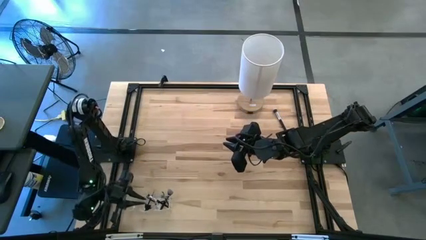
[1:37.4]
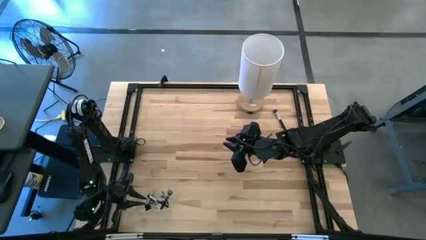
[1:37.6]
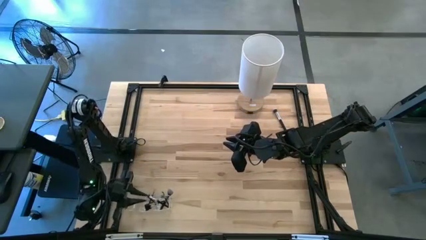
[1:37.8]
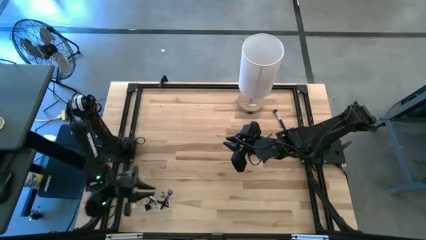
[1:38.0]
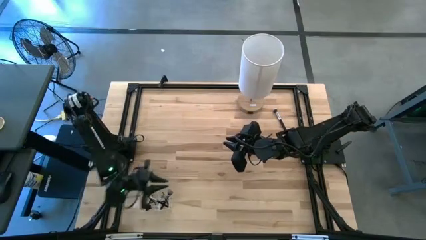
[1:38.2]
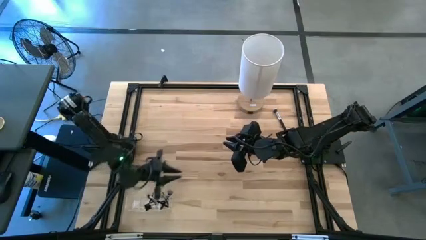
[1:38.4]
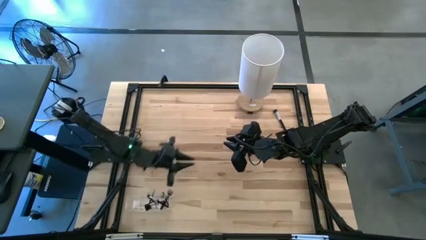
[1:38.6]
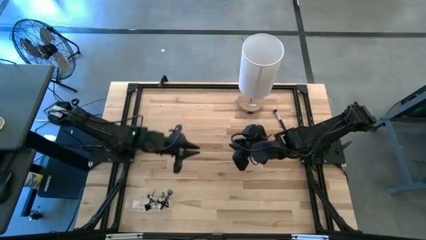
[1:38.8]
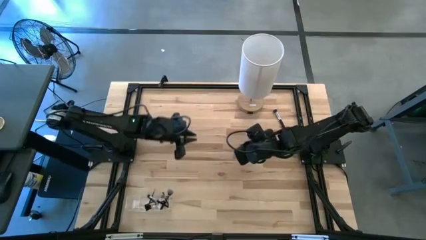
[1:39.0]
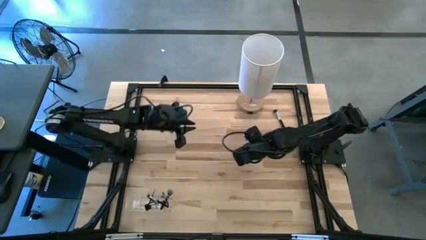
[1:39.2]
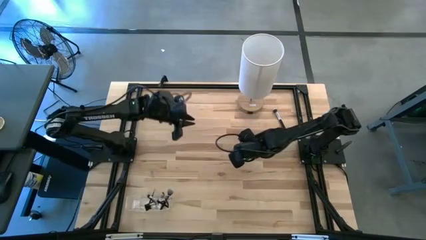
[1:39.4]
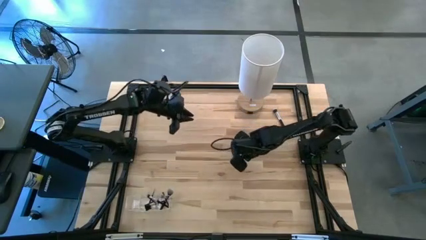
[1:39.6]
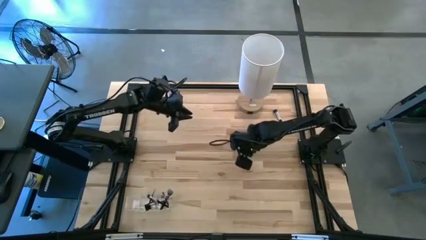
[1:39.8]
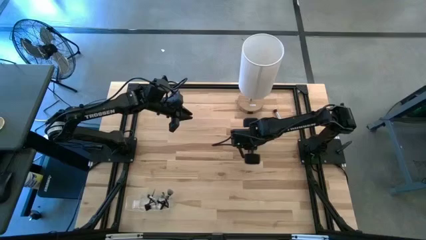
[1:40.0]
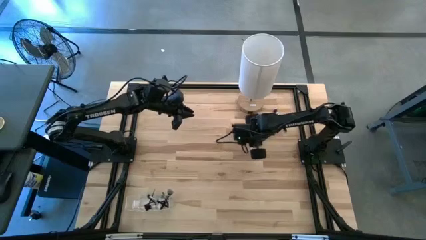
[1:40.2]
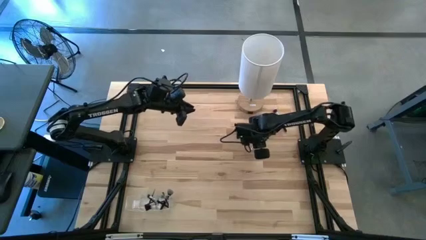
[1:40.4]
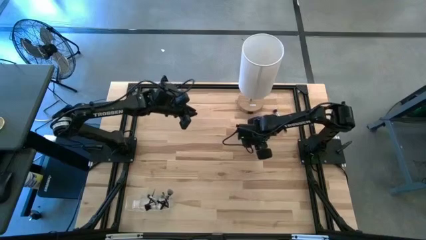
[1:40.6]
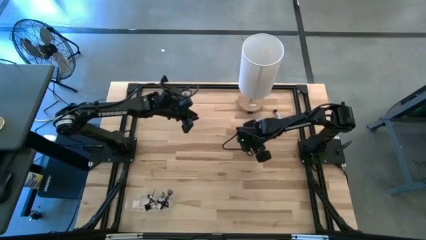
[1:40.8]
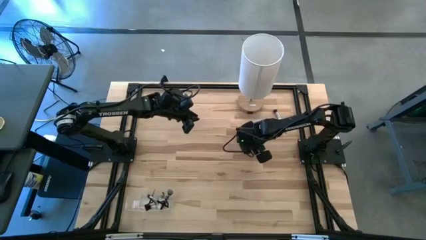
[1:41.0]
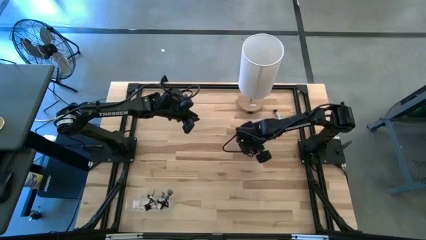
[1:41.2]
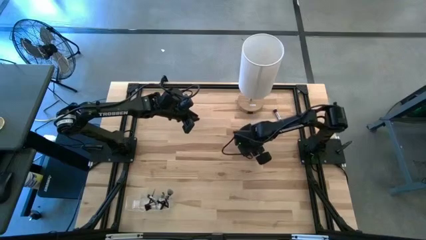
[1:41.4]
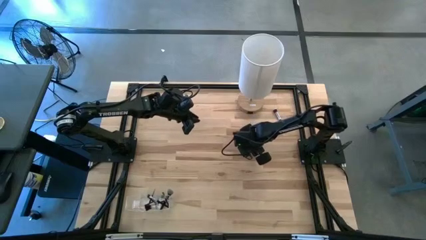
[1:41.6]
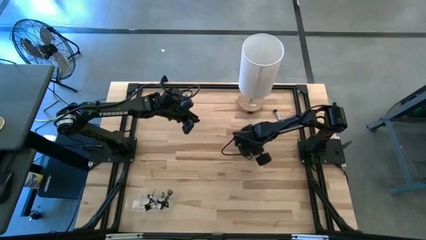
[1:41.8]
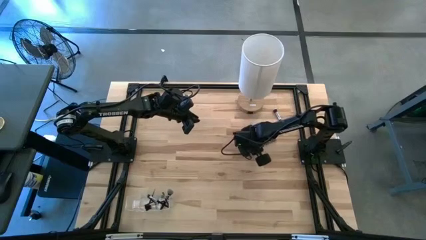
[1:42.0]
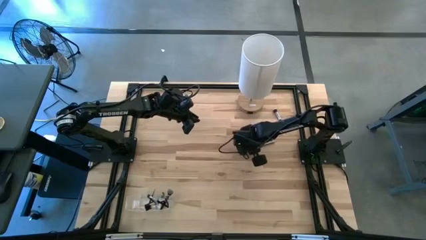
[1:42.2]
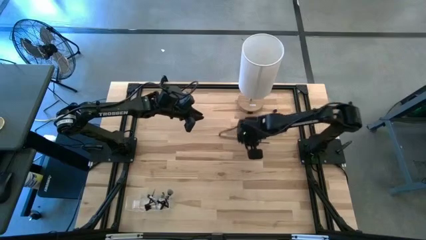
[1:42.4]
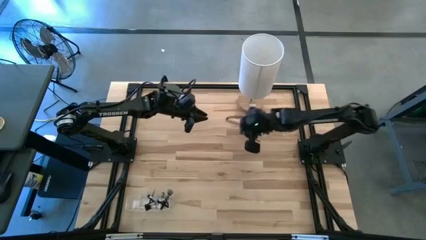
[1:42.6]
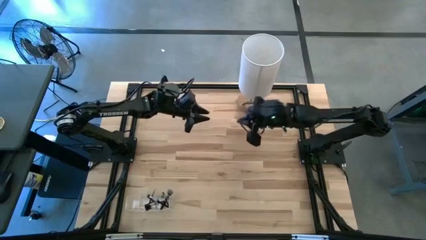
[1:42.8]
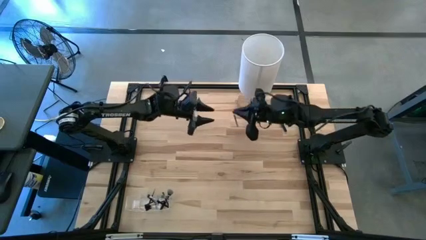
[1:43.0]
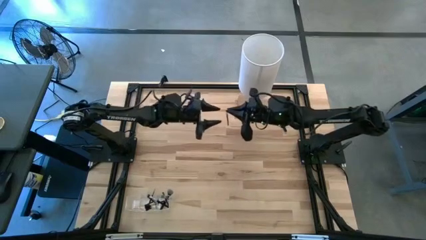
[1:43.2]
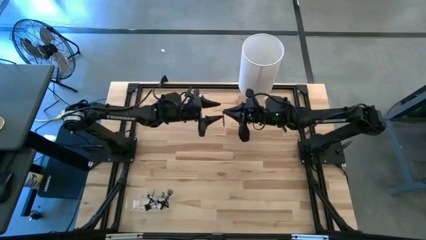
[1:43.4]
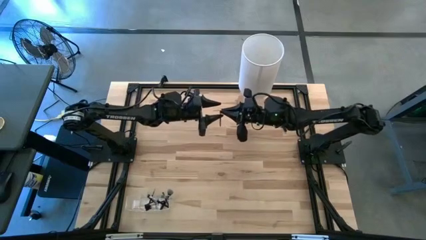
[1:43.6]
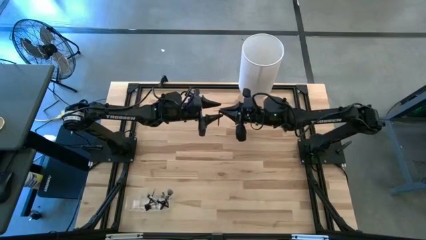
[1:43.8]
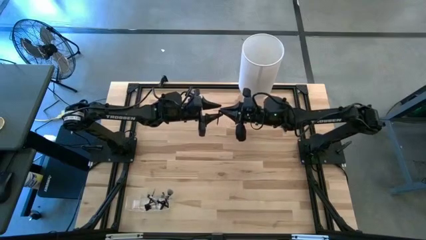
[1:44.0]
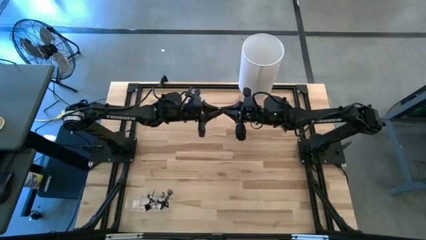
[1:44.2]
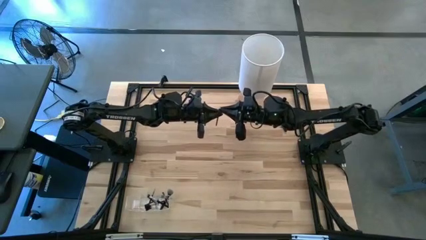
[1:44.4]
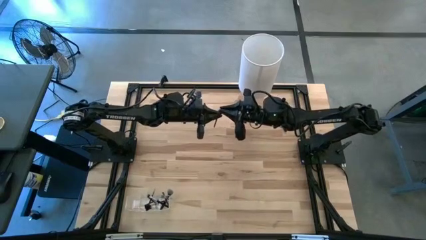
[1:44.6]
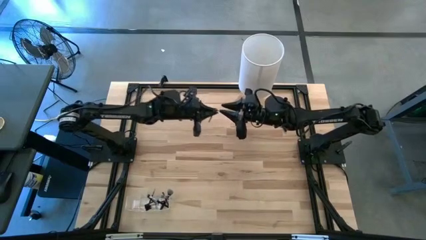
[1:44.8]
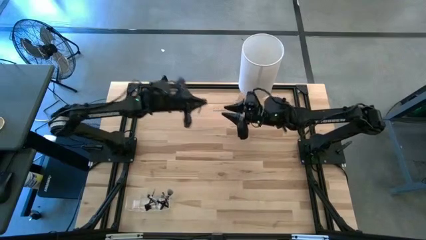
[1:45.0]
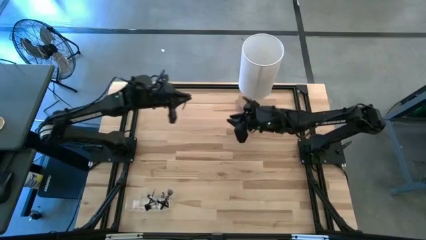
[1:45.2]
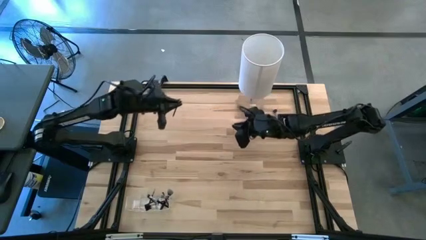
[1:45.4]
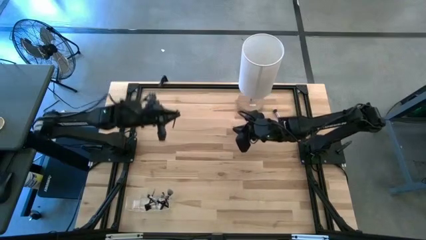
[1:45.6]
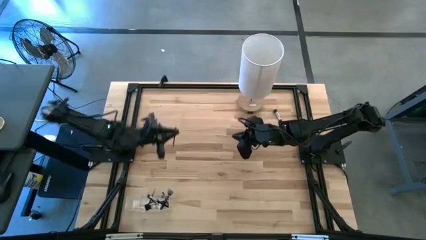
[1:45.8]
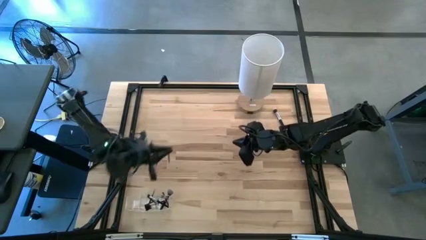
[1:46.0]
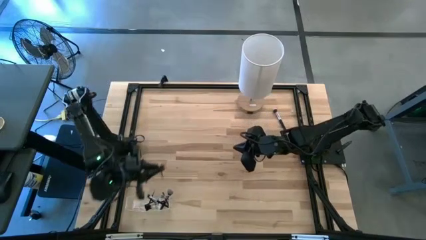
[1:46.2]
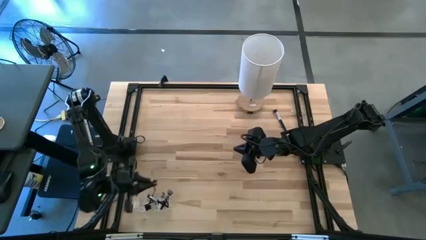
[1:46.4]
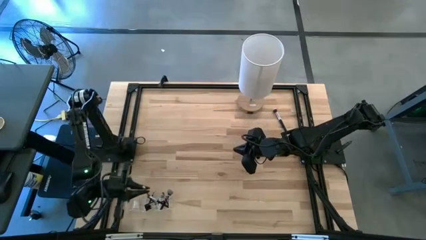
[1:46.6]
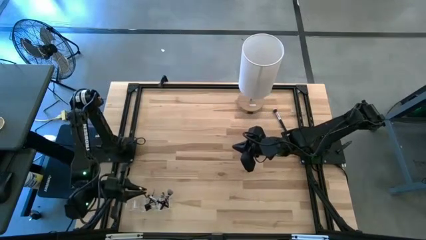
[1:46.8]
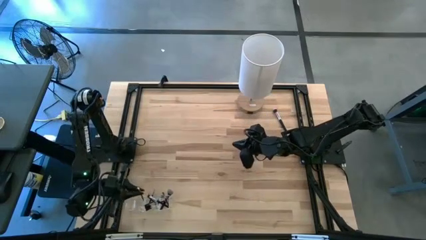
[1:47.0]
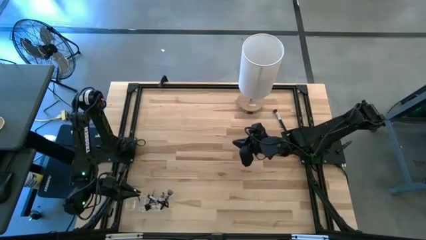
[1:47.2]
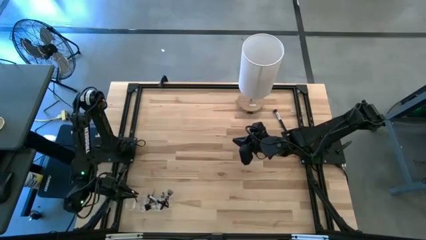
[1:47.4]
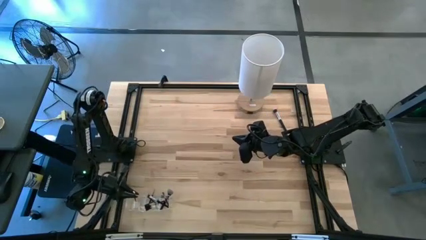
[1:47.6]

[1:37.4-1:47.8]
Task: Put items in baskets/containers
Put the eyeshadow brush into the transparent organizer

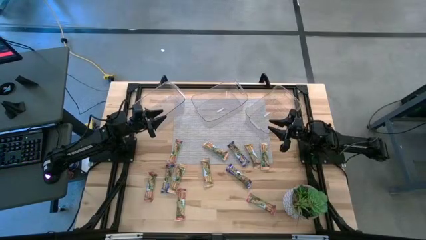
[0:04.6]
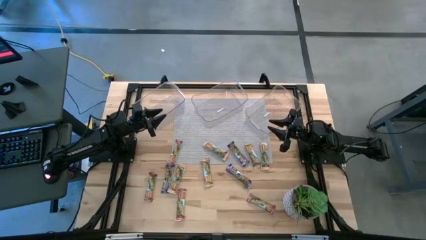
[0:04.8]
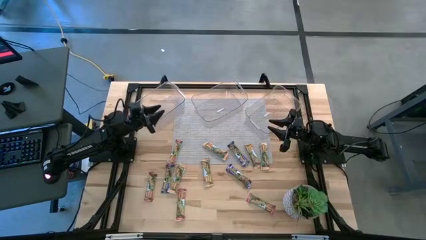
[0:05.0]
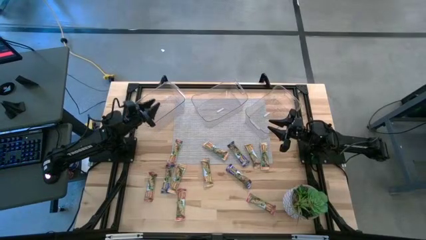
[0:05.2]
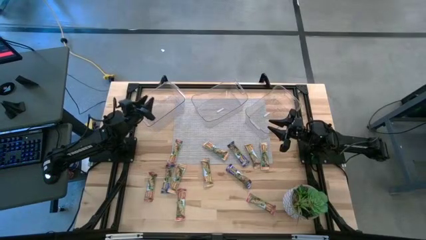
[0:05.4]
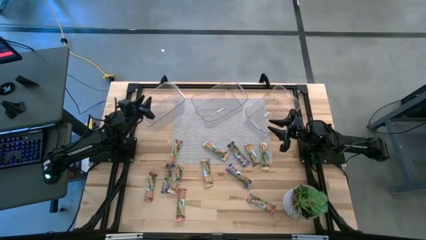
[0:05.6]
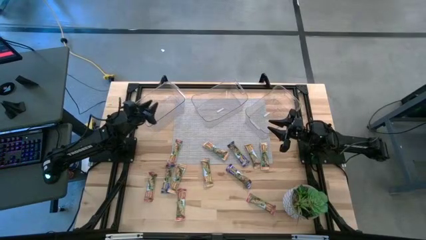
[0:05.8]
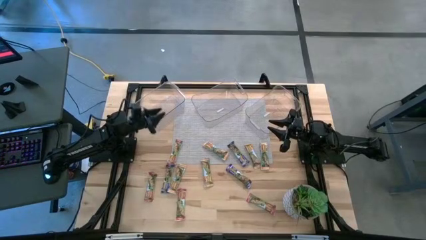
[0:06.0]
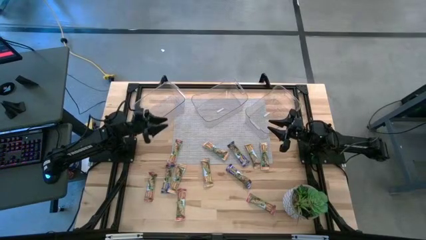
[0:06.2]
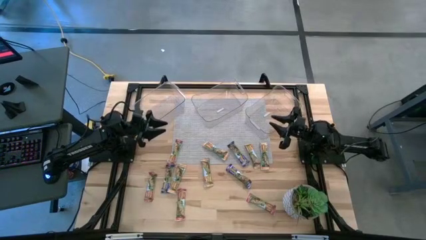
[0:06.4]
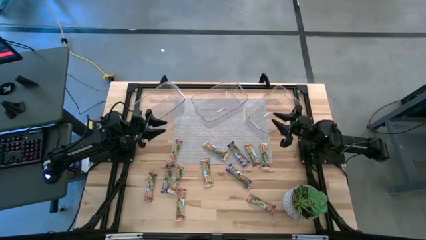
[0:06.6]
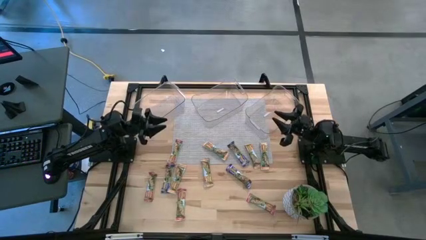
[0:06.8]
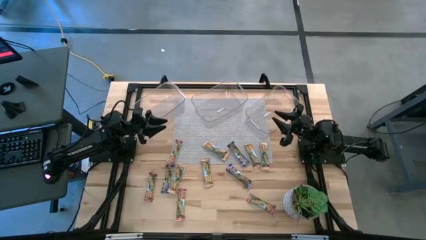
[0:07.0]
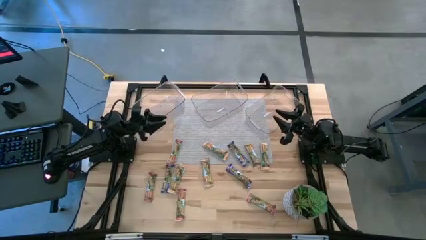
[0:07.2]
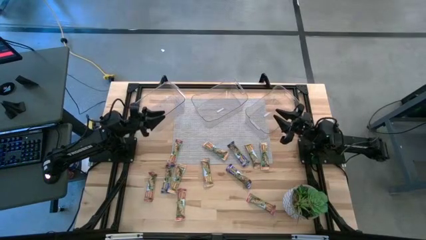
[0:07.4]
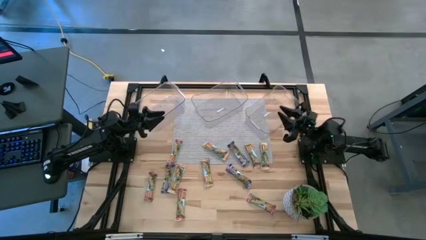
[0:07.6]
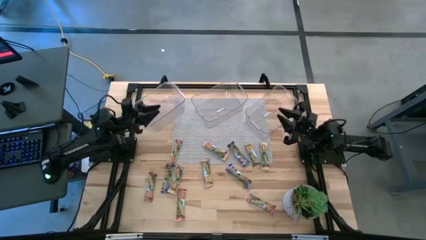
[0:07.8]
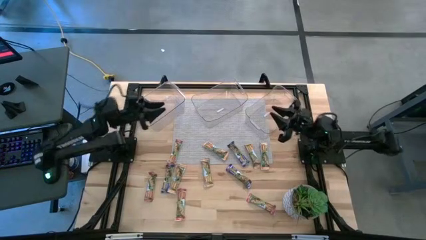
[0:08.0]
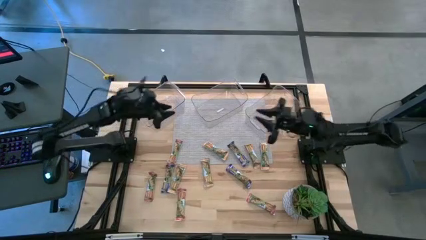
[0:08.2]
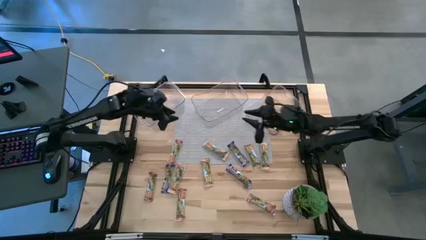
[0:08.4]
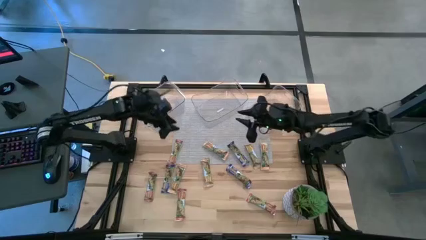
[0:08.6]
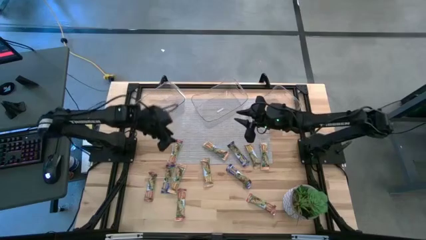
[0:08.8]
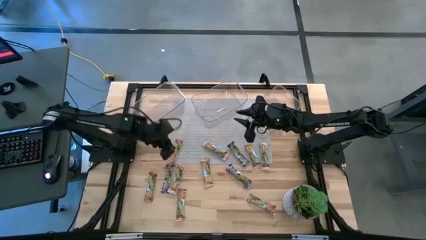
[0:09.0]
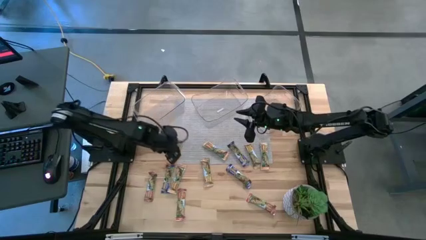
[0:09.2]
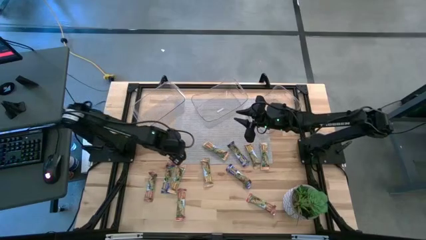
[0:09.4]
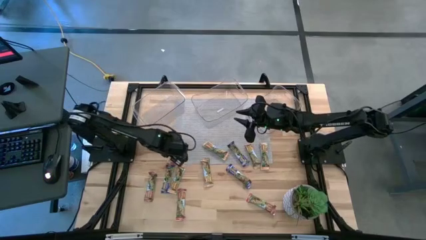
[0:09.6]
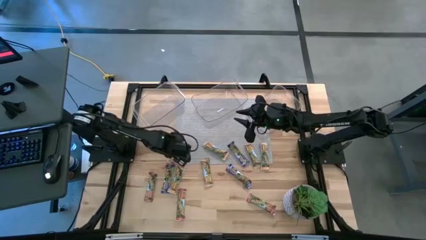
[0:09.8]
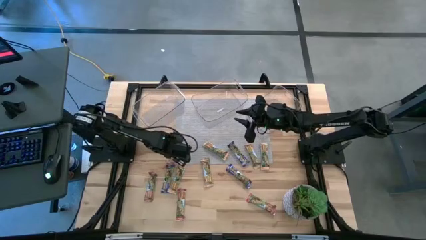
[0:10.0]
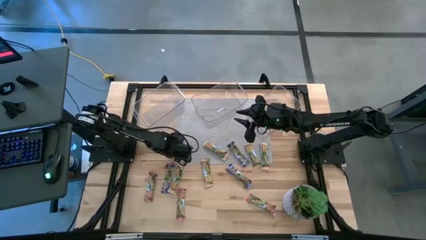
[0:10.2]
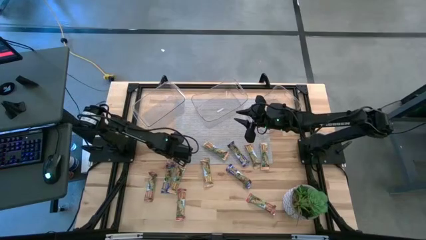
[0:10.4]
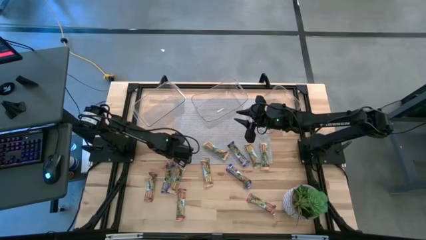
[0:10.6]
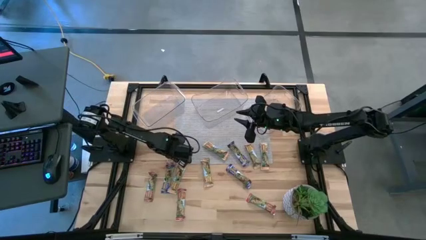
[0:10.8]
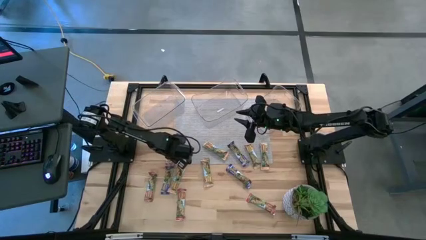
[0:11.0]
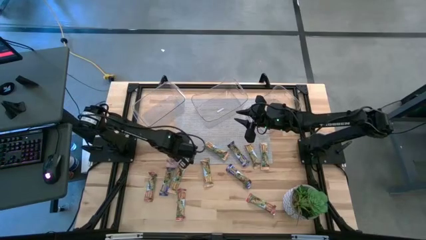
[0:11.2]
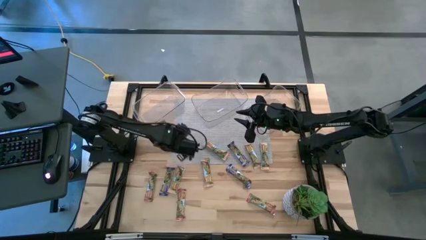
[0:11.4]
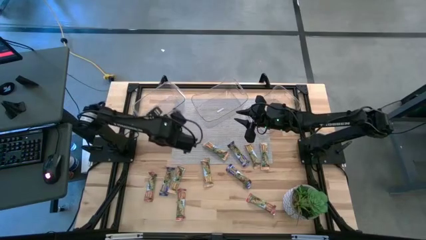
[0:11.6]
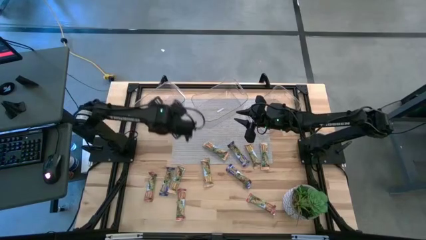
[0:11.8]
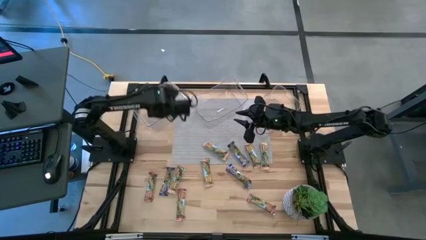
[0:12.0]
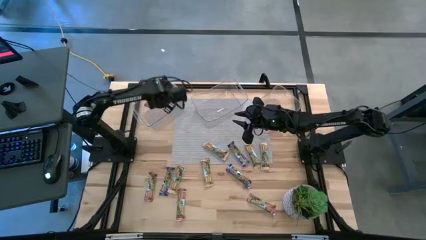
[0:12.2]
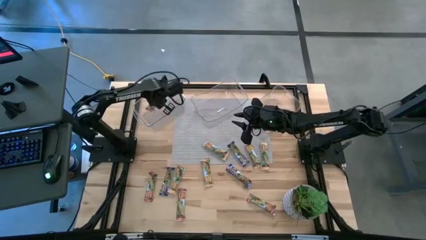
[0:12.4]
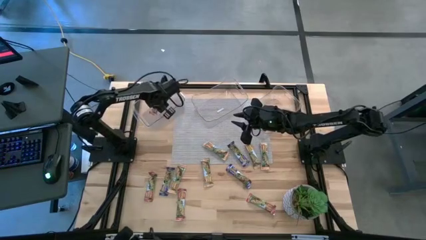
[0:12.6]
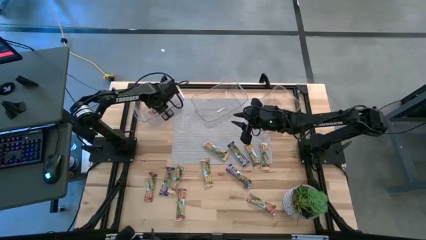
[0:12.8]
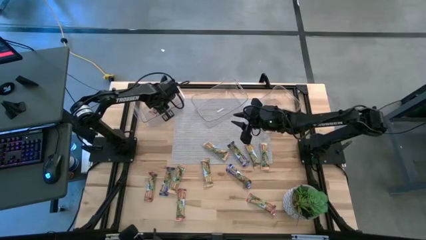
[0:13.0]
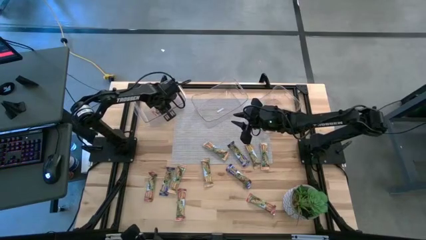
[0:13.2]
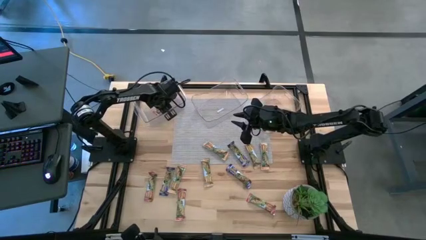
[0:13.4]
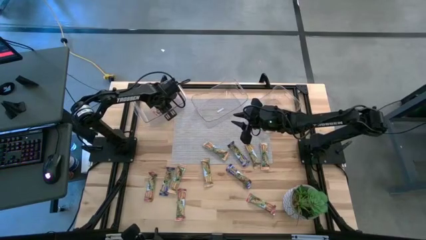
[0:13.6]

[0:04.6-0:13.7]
Task: Pick and place Granola Bars by type
Put the red granola bar into the left transparent bin
